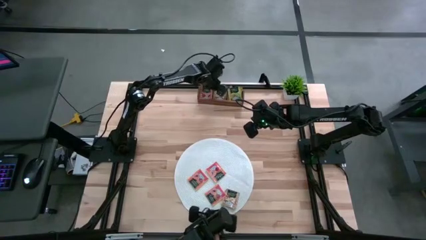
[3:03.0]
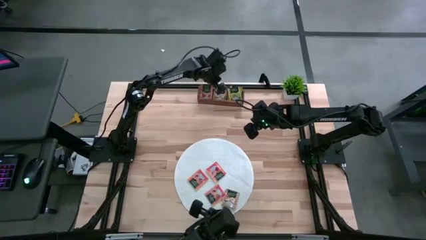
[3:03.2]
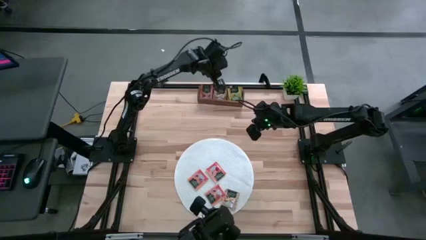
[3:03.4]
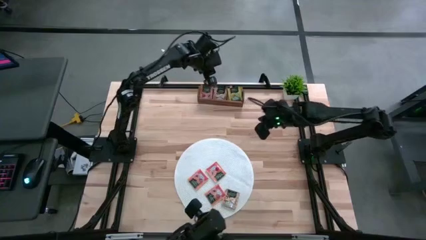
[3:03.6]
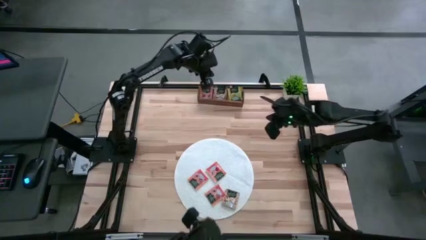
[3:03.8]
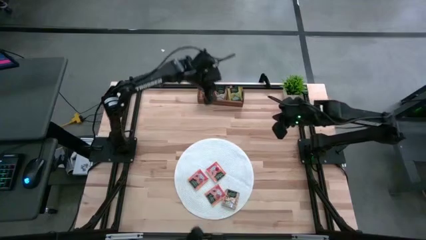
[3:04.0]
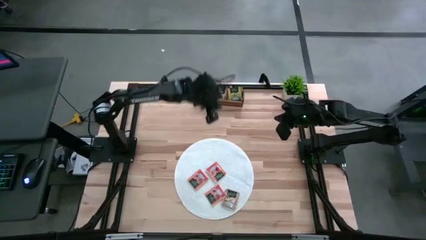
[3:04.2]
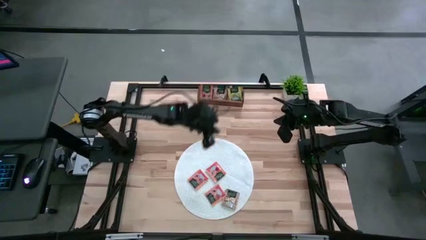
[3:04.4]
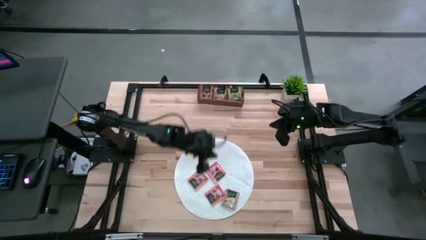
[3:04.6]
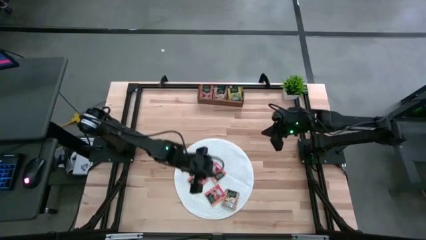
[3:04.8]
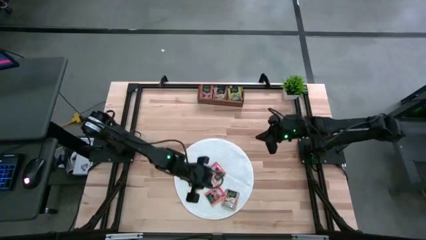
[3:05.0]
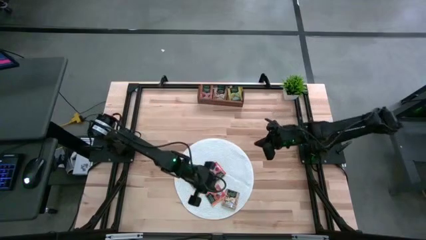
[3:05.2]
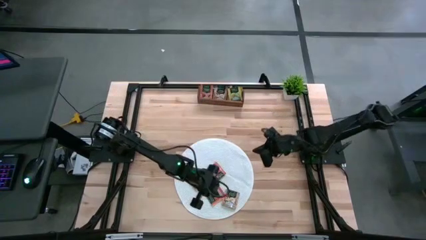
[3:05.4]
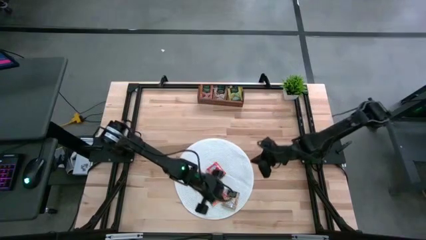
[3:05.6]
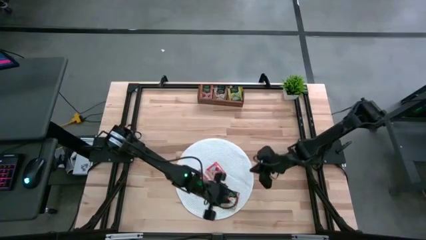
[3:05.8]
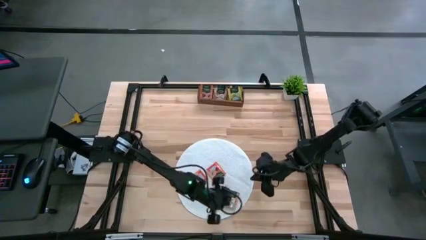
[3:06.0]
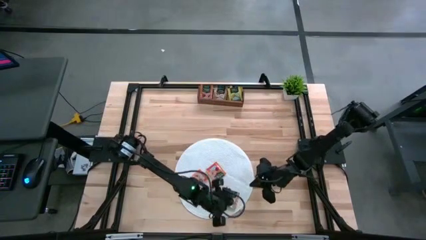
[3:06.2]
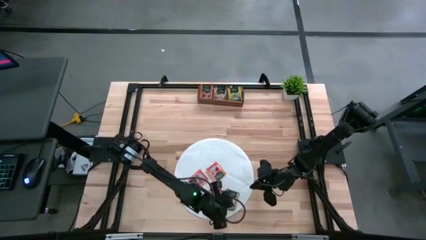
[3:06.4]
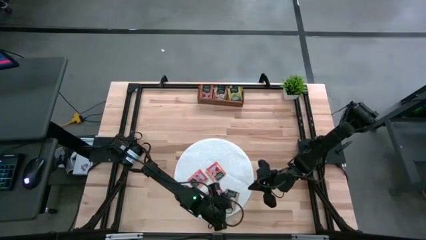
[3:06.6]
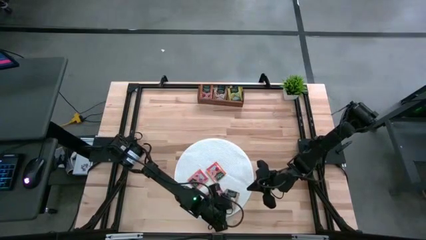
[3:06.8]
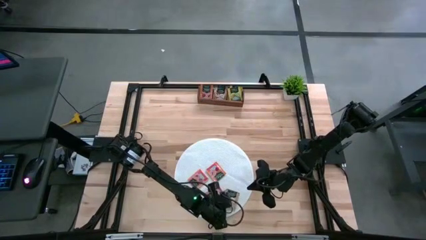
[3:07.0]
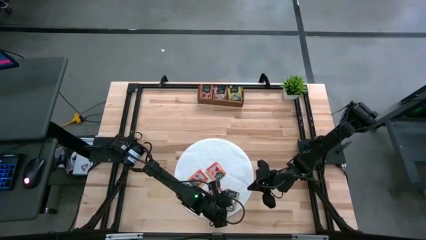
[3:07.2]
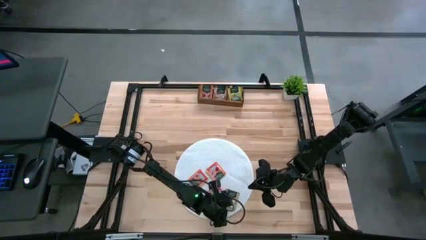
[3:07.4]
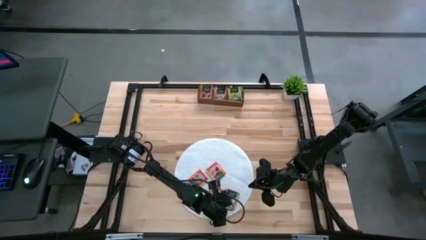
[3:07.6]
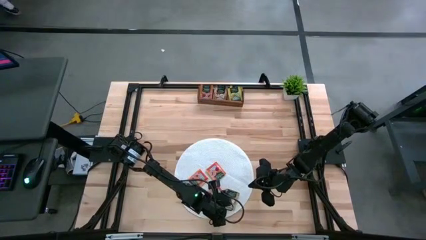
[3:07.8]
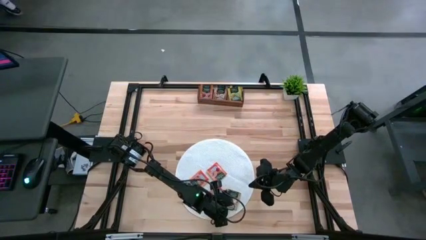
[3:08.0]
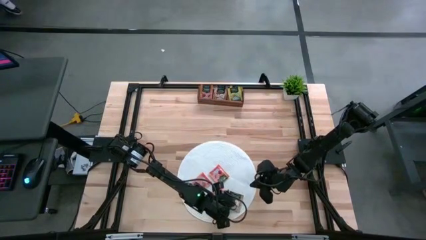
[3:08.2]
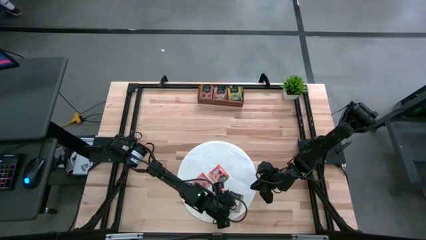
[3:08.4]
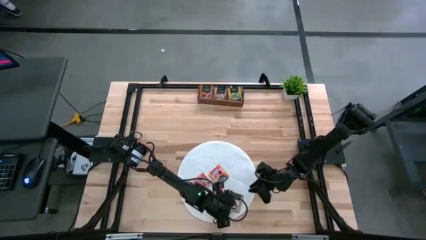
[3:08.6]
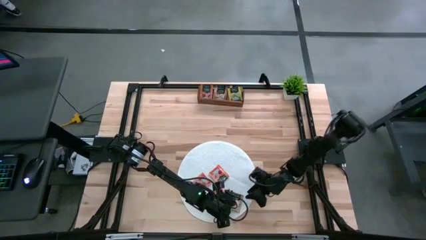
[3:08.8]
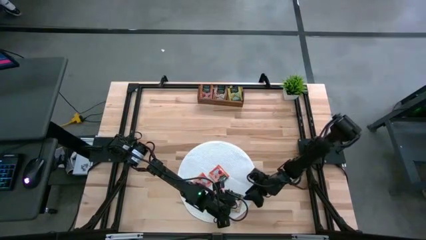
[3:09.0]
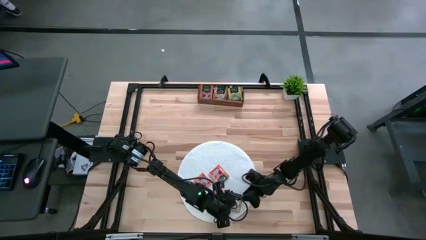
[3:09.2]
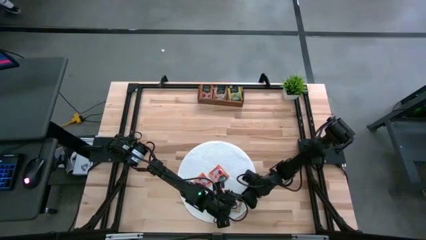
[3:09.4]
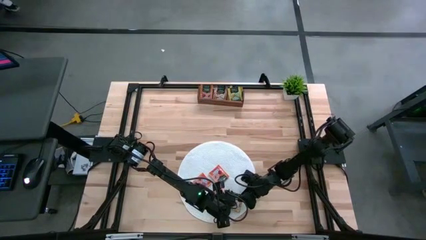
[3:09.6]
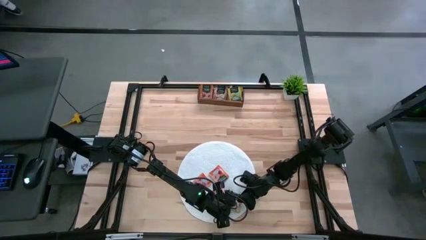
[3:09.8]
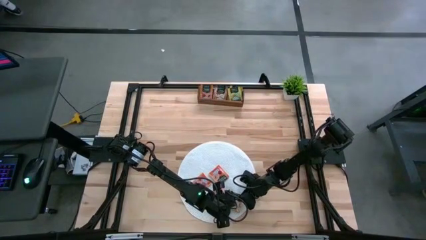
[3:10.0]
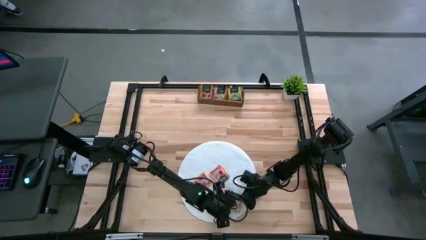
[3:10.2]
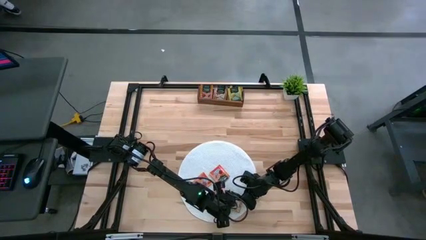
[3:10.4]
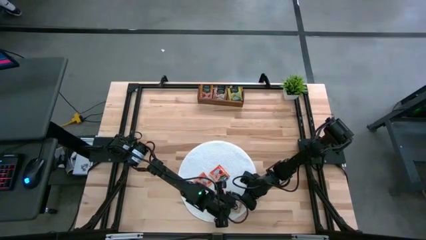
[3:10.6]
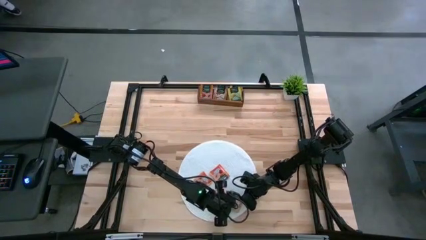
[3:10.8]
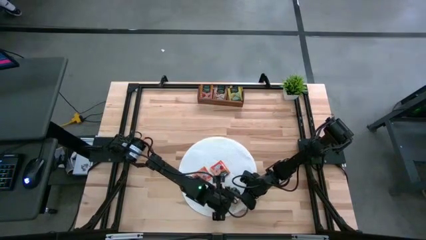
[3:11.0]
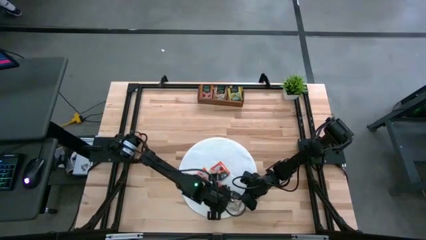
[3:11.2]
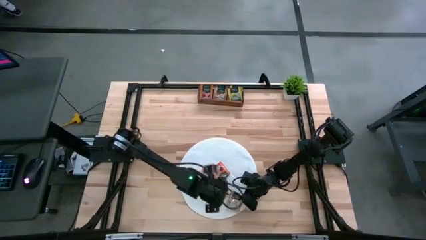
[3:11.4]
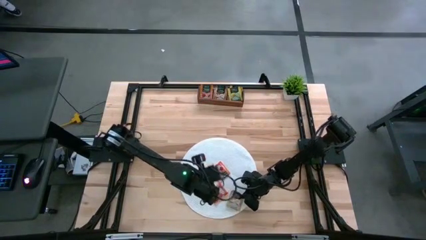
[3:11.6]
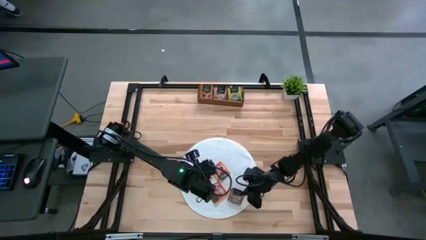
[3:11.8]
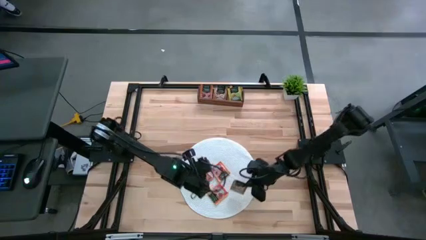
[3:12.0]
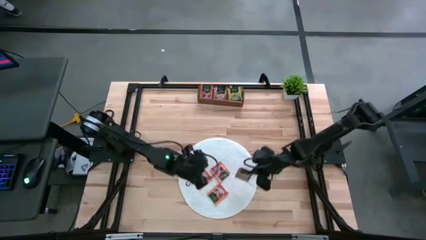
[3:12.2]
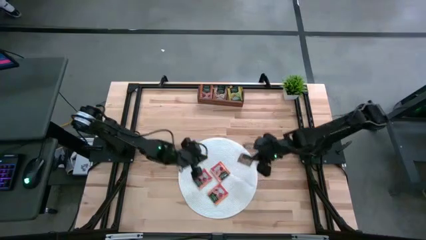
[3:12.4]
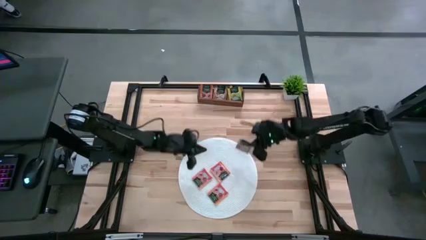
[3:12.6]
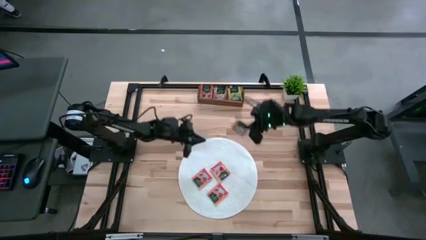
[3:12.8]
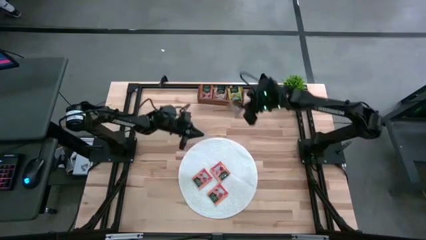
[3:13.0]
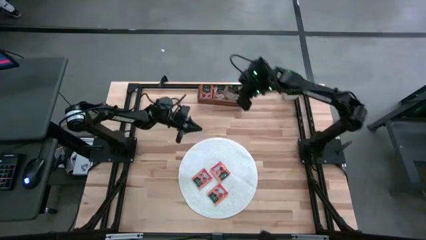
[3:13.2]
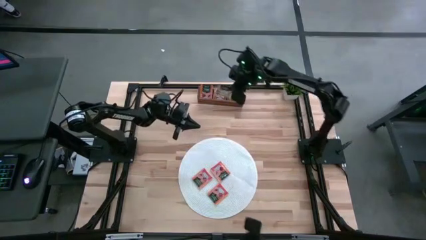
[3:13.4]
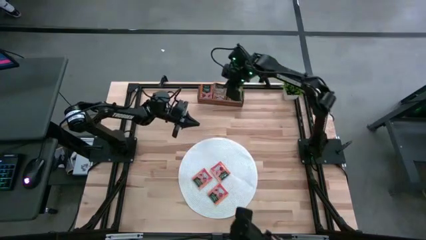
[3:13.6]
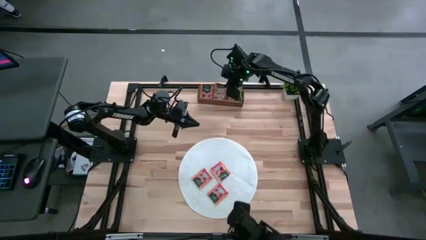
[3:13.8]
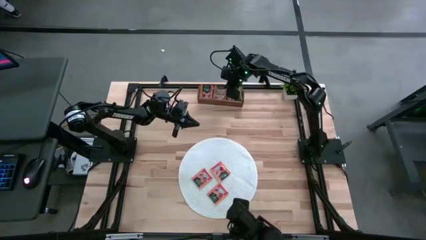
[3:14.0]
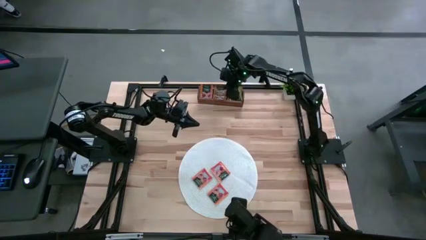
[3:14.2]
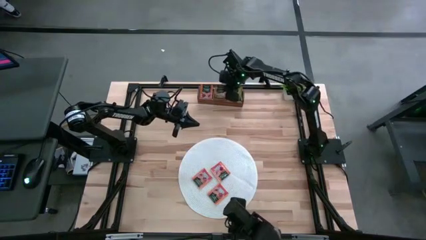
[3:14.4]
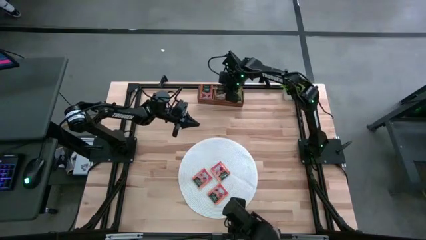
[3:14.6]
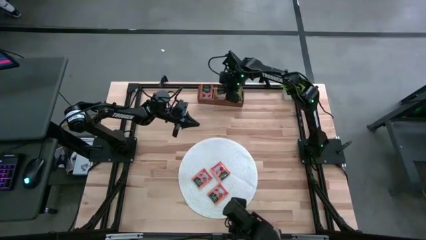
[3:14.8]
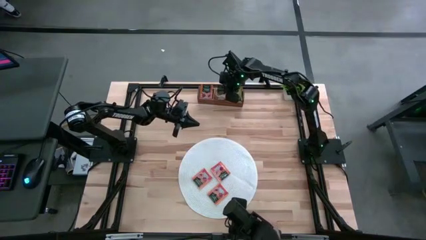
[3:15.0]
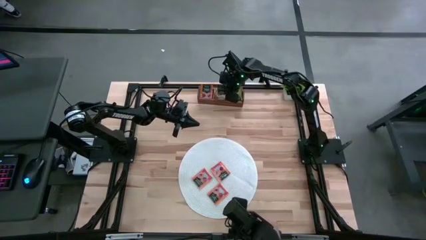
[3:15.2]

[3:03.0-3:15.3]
Task: Pick & Place Tea
Put the brown tea bag into the middle section of the wooden organizer
